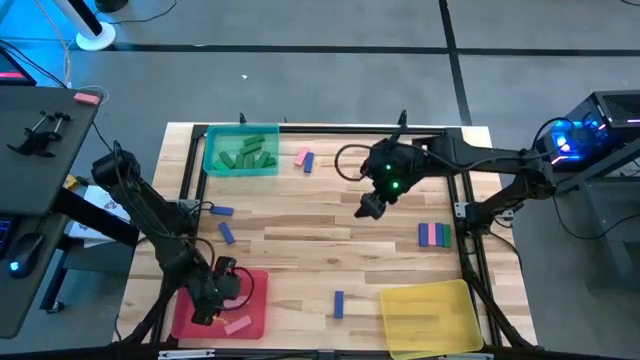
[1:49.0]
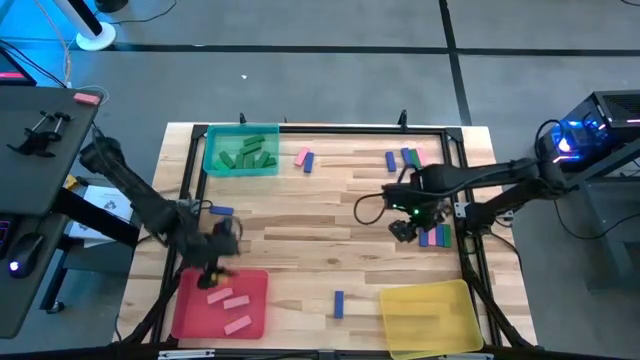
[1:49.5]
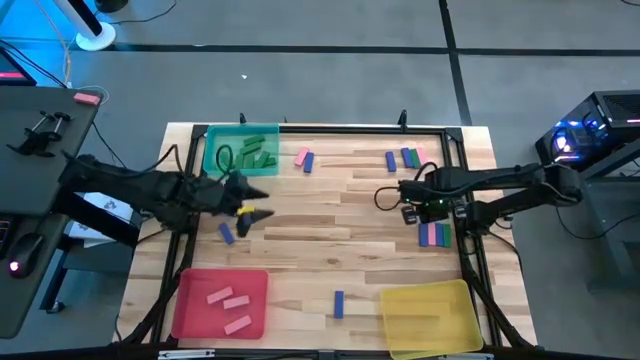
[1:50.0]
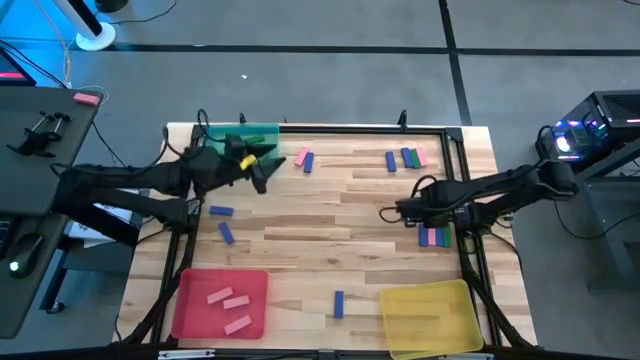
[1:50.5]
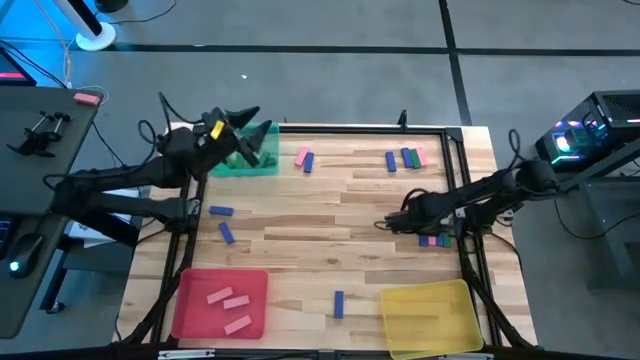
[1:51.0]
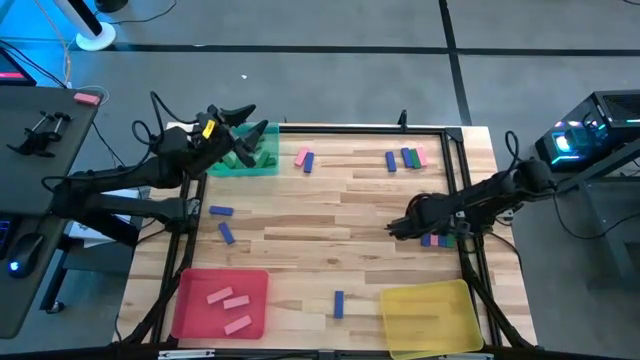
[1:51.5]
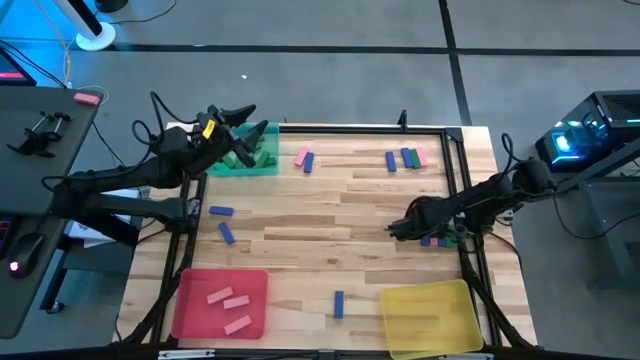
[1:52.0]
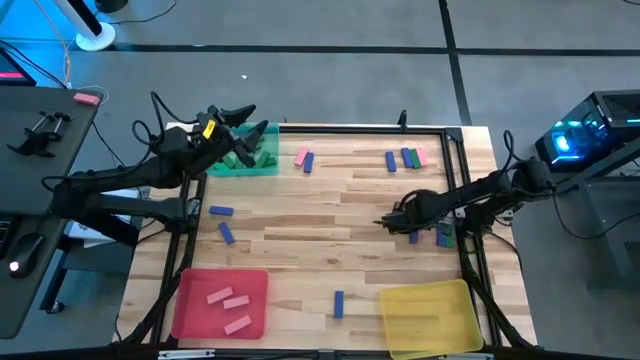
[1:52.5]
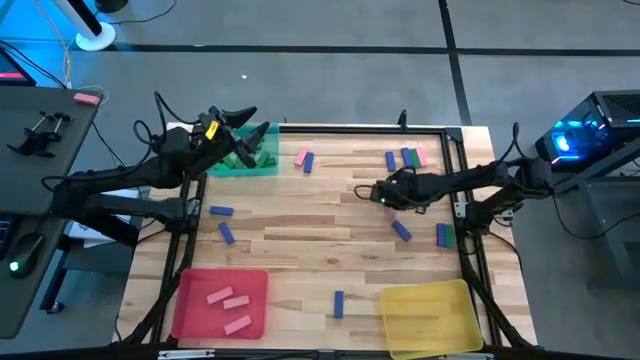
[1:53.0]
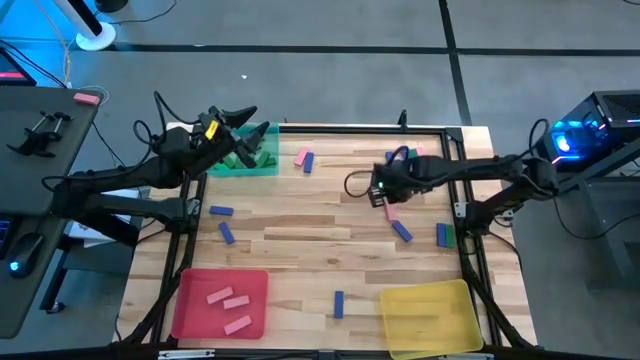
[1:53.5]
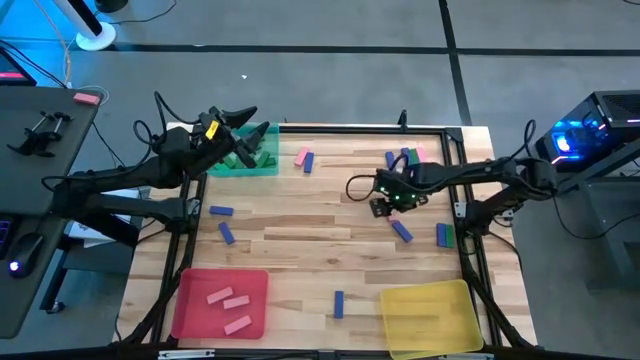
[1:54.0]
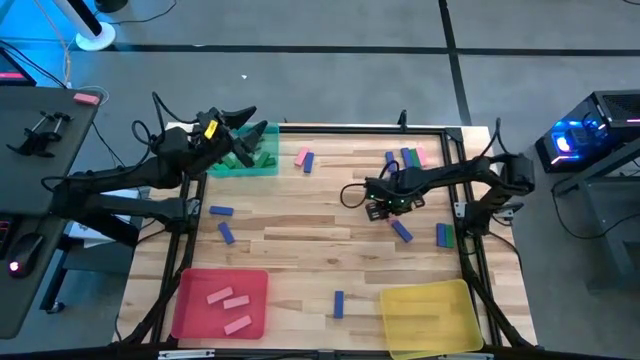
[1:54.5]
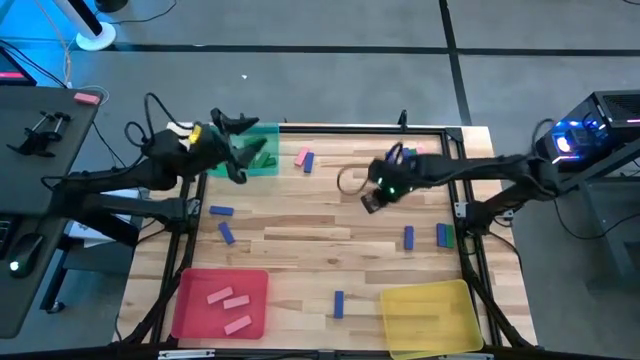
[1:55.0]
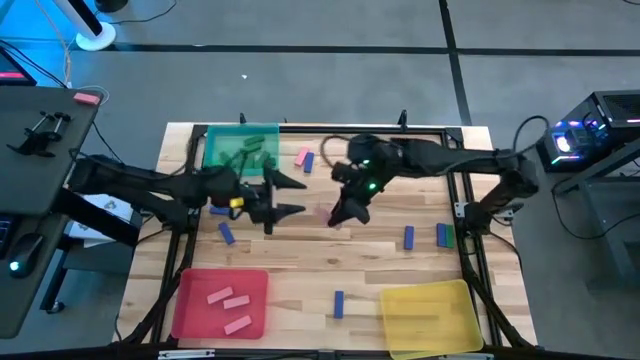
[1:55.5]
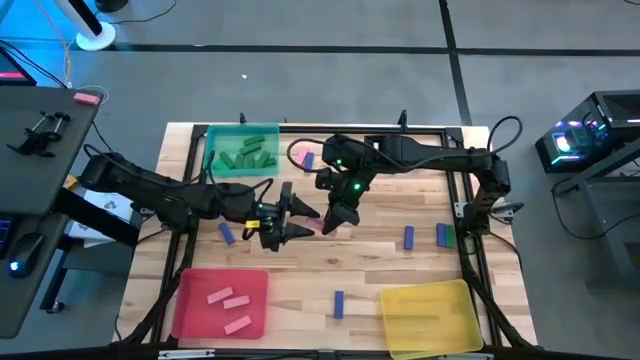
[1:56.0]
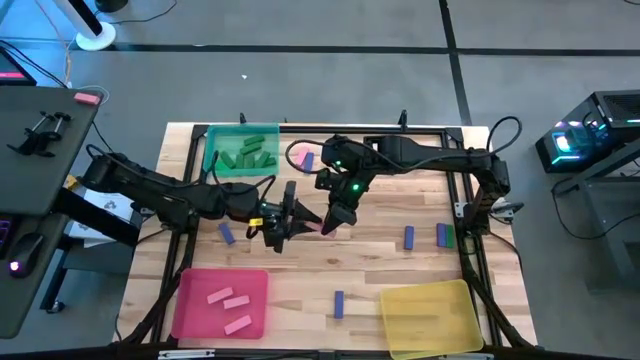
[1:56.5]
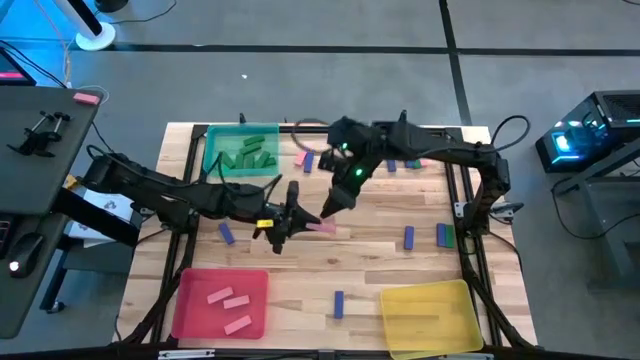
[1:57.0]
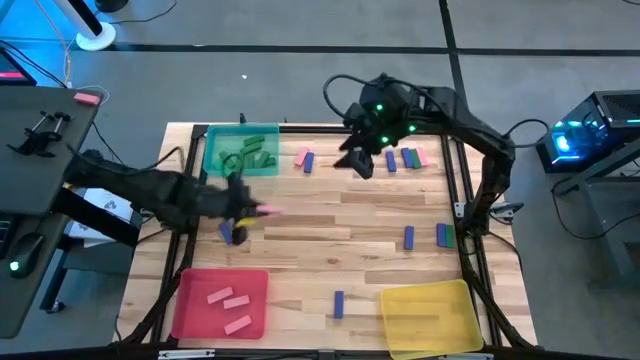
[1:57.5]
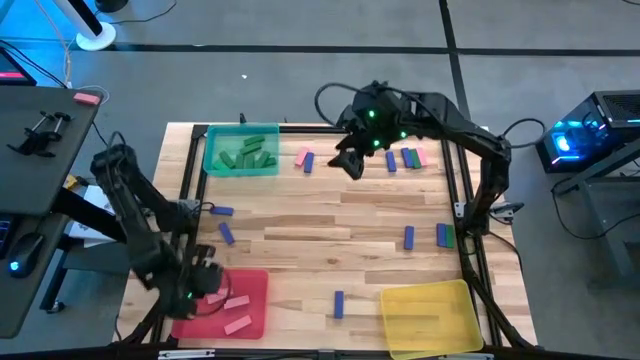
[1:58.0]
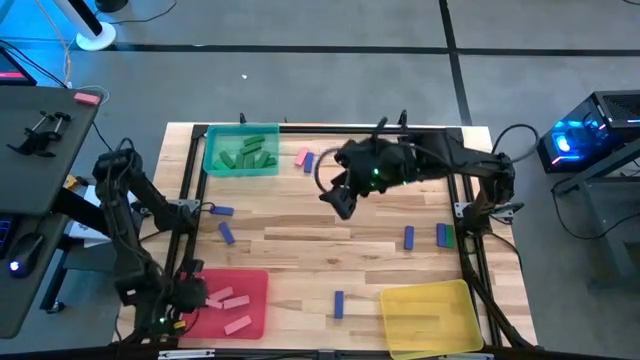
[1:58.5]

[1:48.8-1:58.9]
Task: Sort blocks
Put the pink block into the pink bin

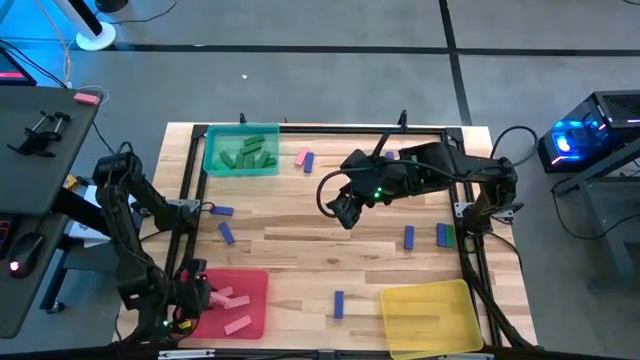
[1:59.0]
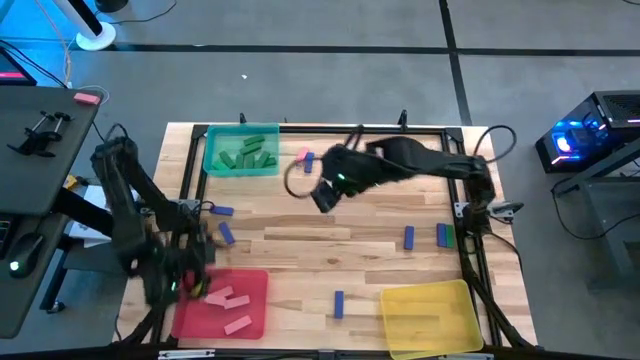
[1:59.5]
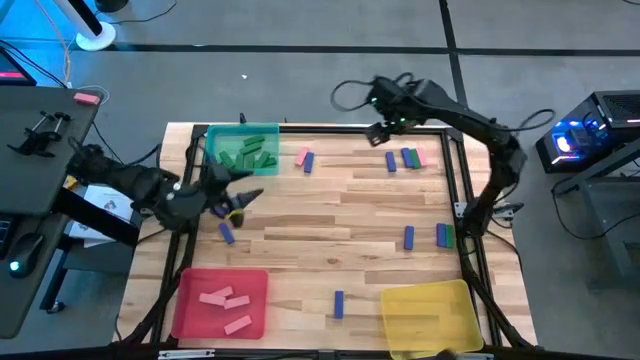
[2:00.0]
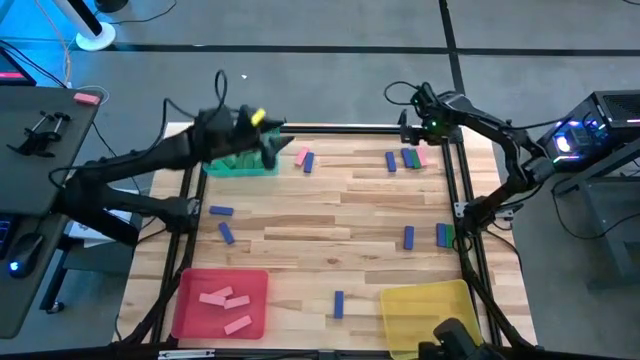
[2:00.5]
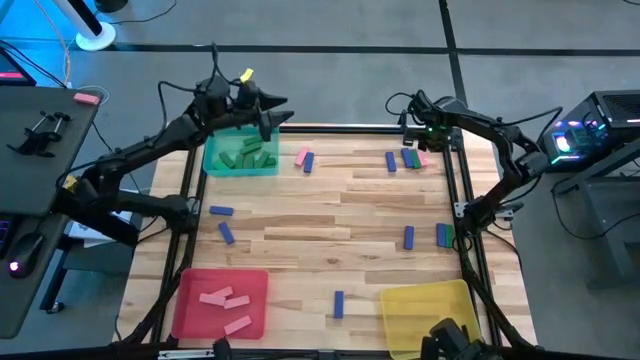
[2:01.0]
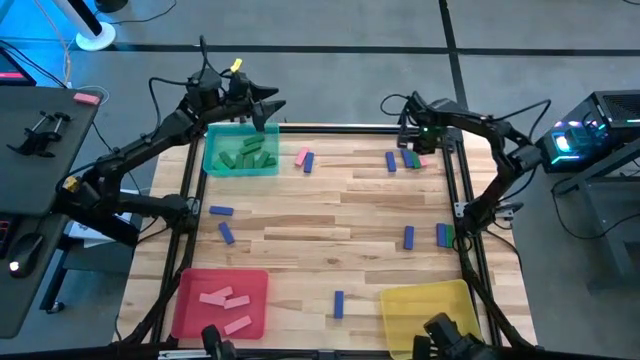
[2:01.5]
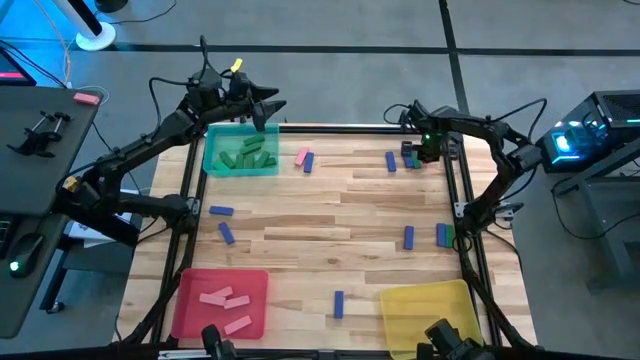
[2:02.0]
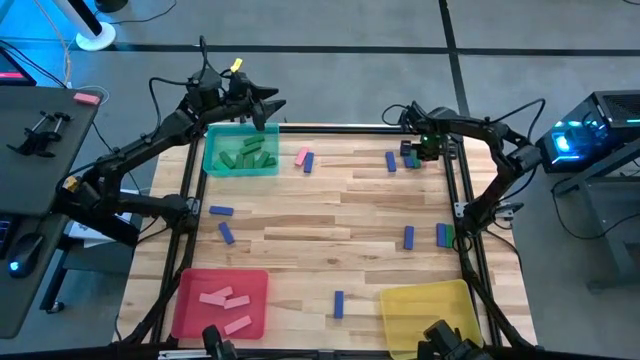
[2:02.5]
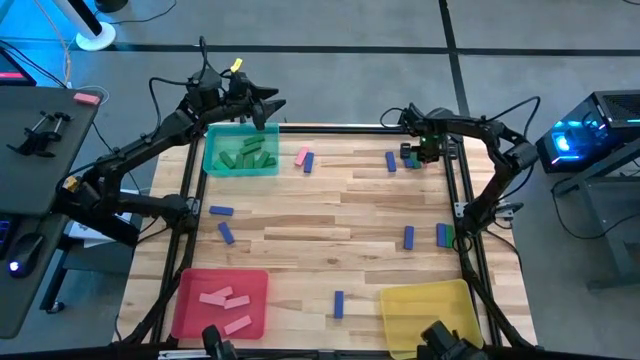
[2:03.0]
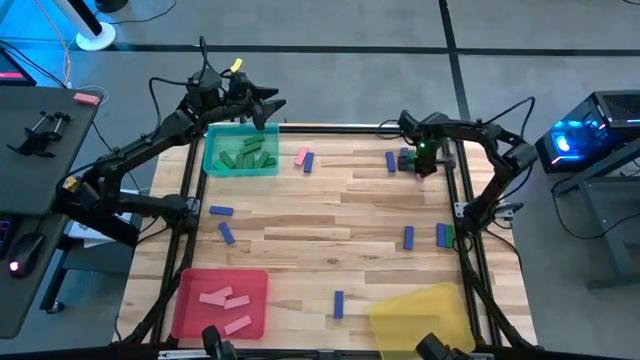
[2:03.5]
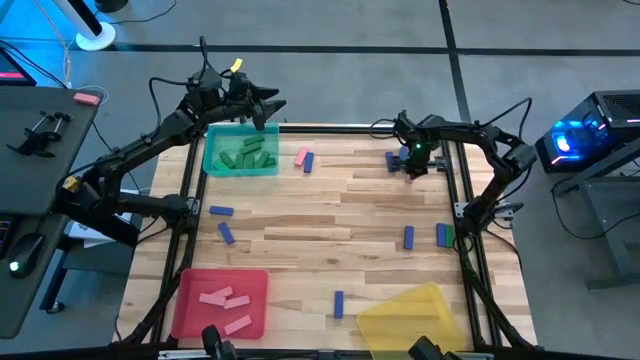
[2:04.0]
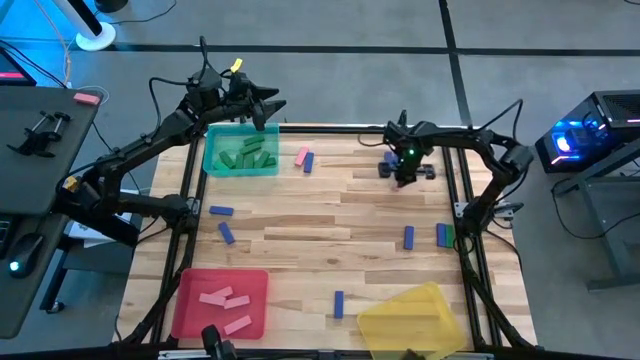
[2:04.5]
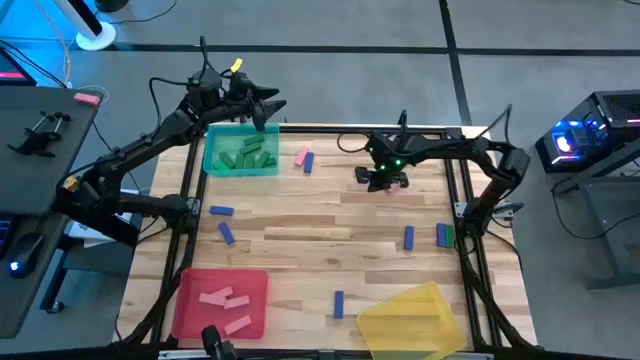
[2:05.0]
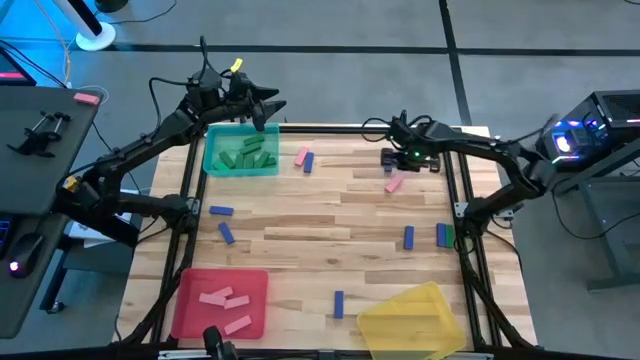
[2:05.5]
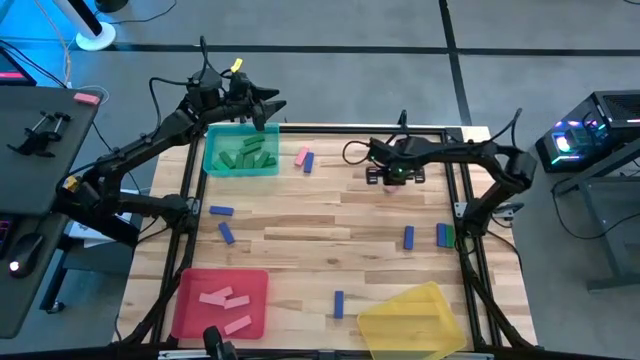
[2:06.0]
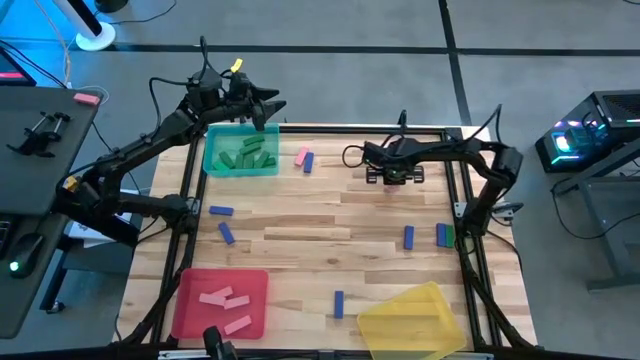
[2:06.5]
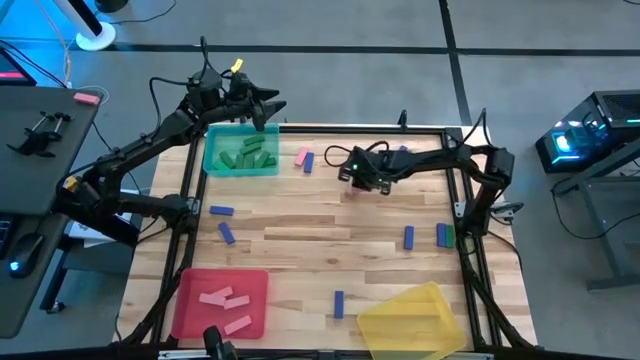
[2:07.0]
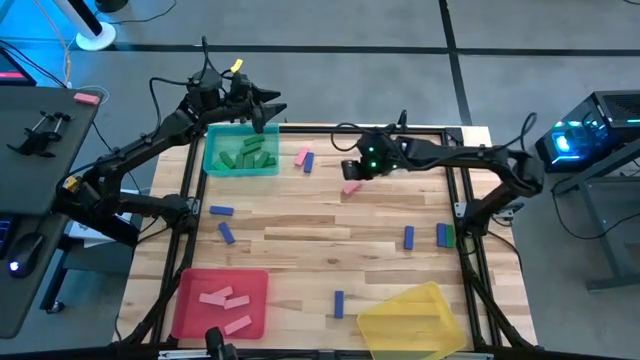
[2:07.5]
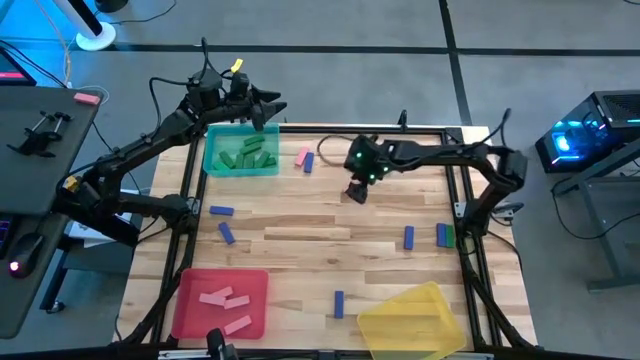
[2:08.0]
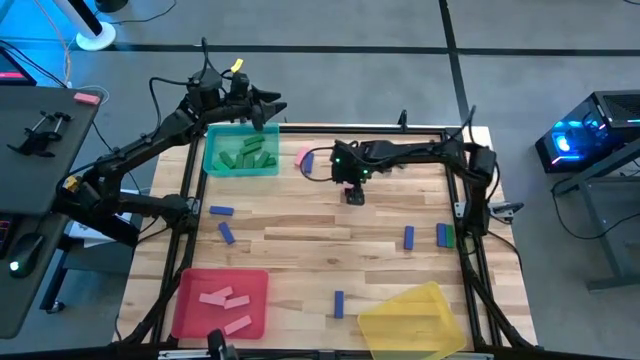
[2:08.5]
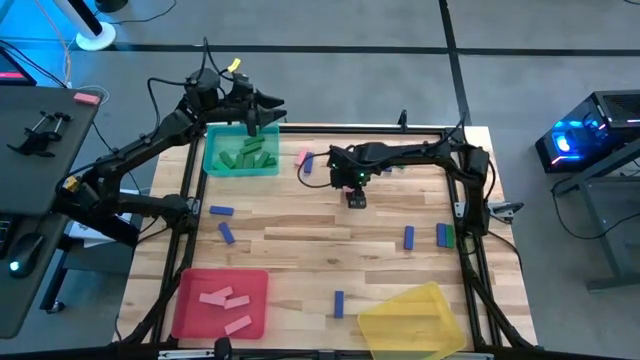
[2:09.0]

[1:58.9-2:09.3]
Put the pink block into the pink bin
